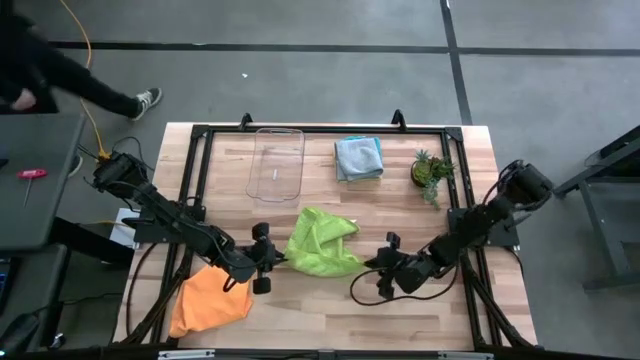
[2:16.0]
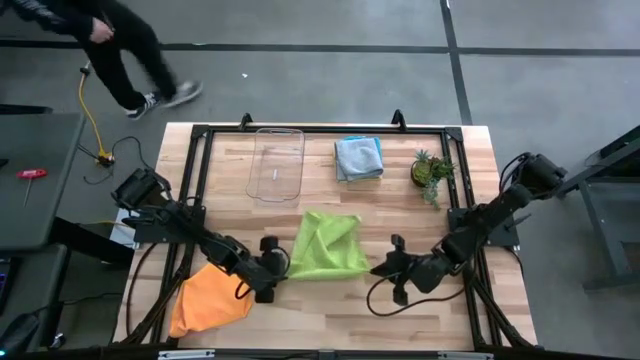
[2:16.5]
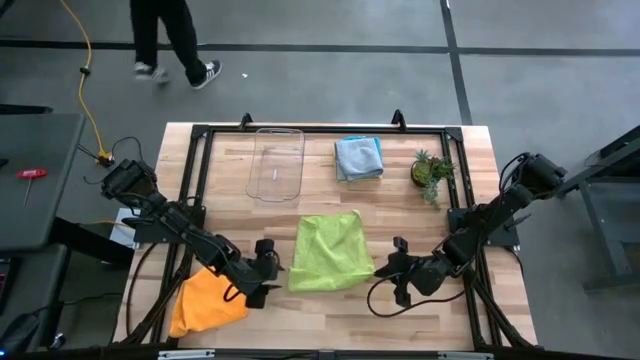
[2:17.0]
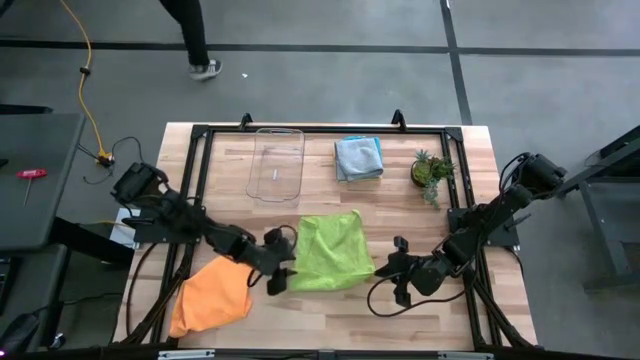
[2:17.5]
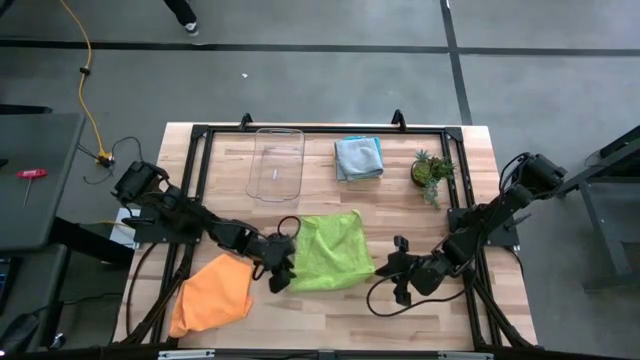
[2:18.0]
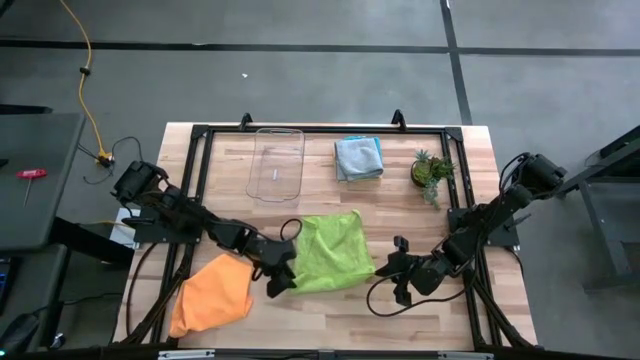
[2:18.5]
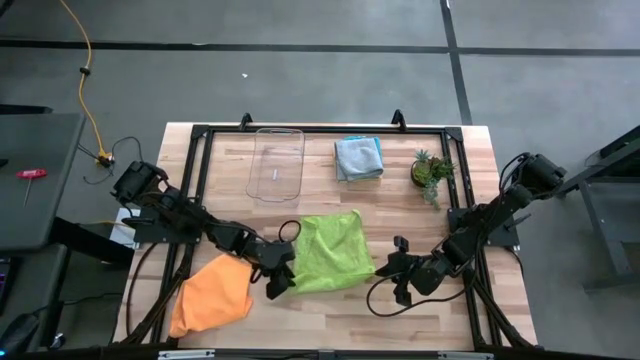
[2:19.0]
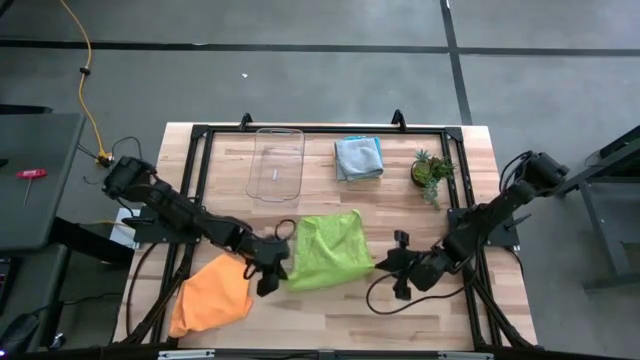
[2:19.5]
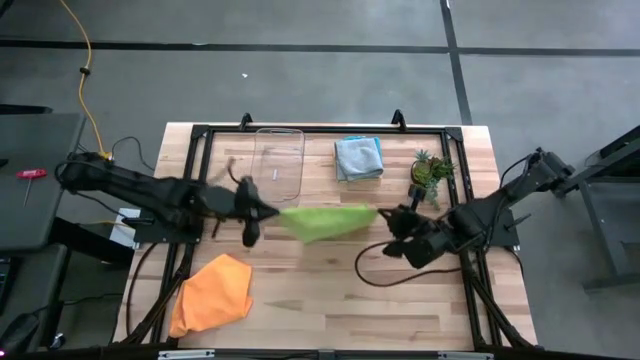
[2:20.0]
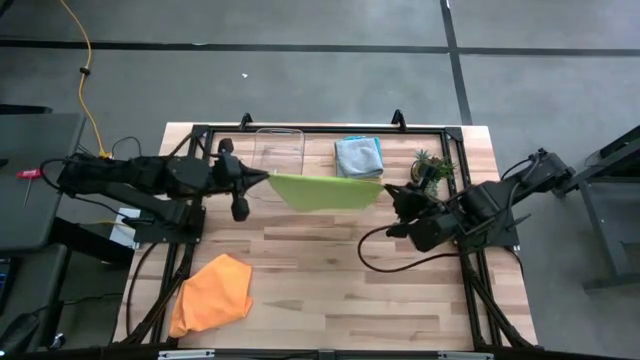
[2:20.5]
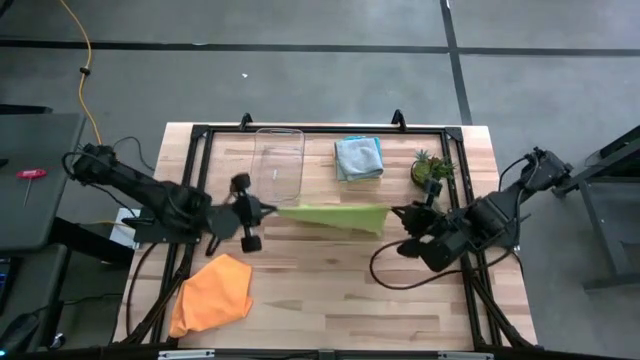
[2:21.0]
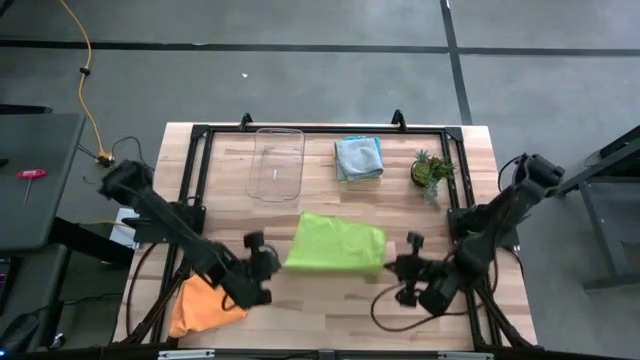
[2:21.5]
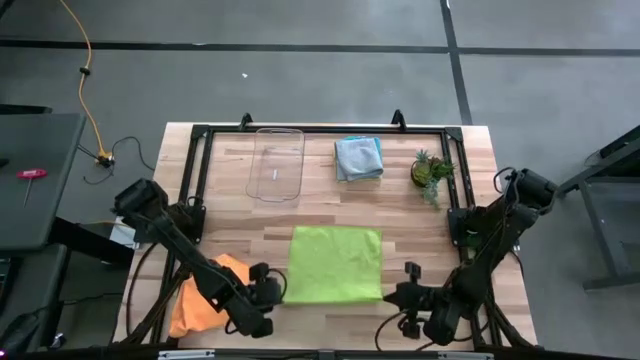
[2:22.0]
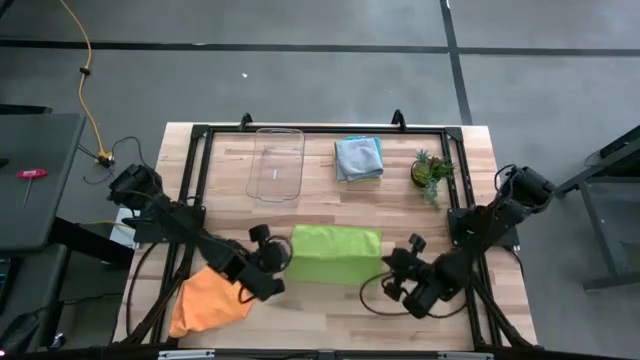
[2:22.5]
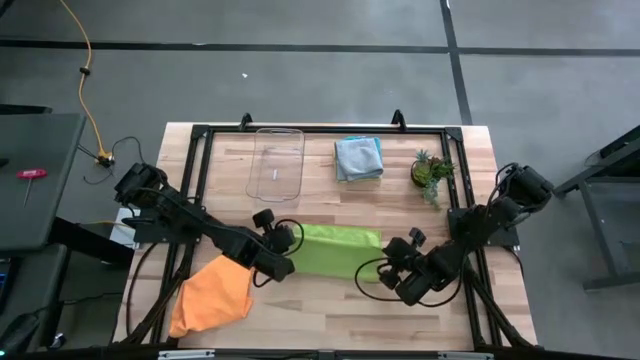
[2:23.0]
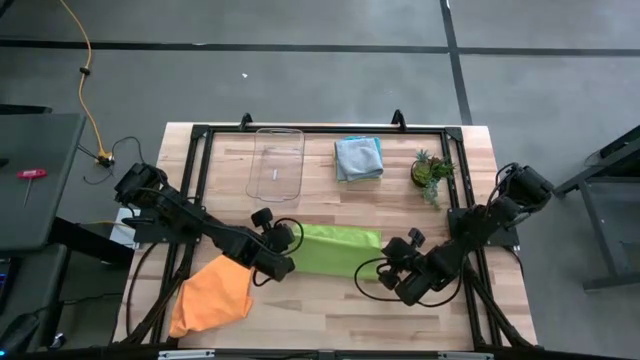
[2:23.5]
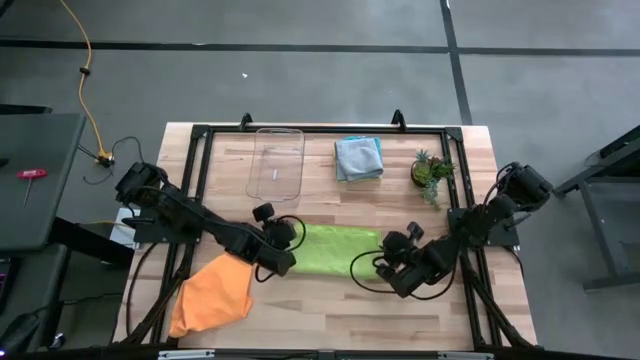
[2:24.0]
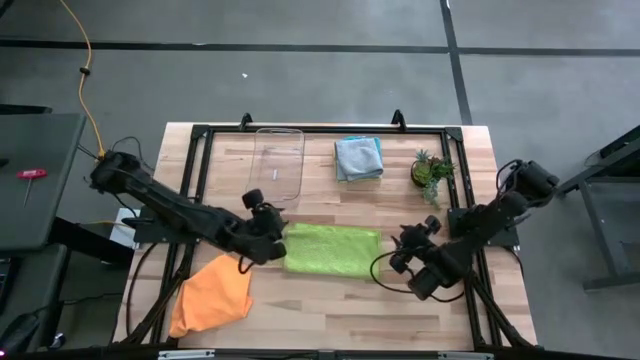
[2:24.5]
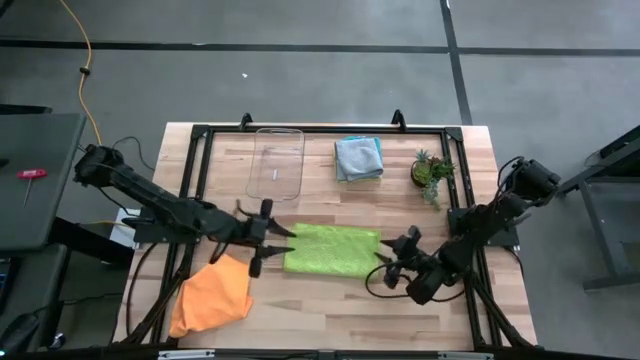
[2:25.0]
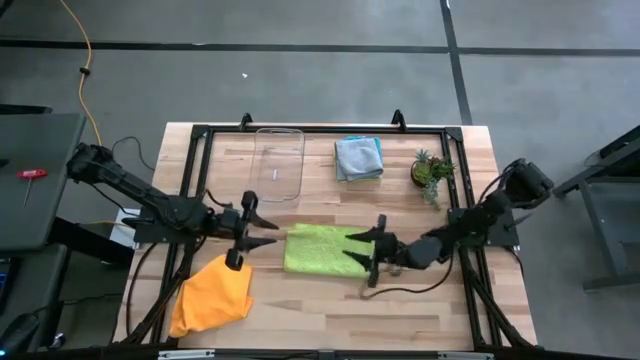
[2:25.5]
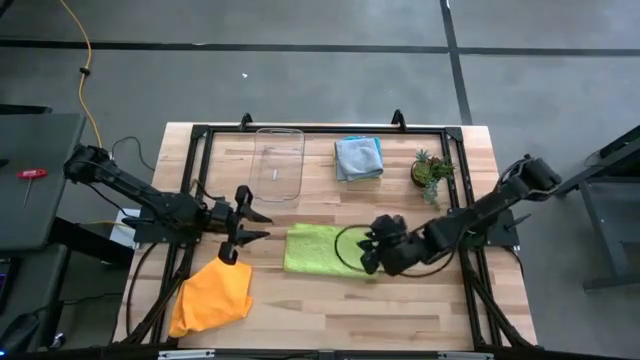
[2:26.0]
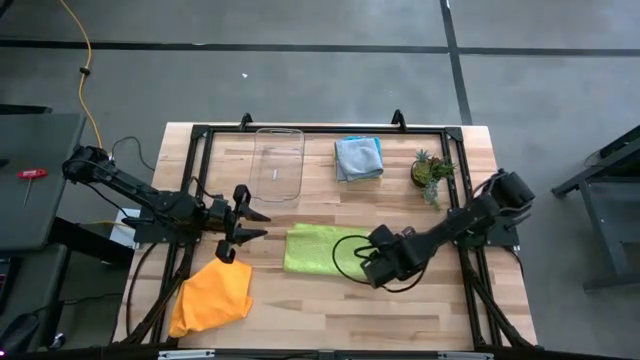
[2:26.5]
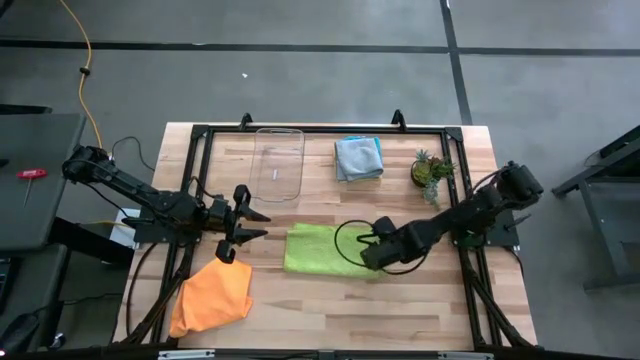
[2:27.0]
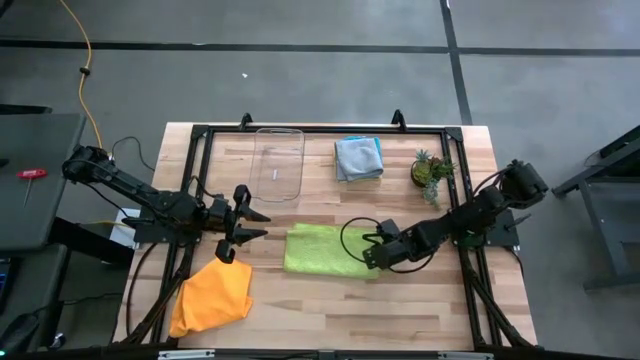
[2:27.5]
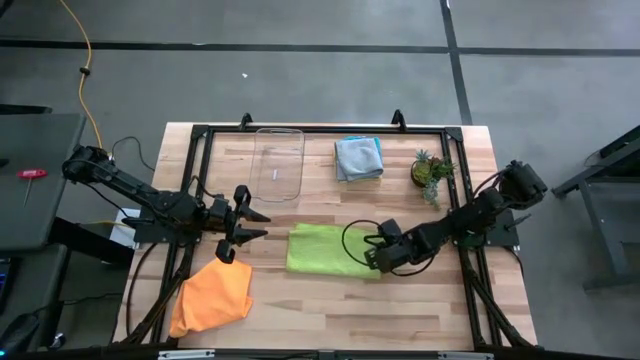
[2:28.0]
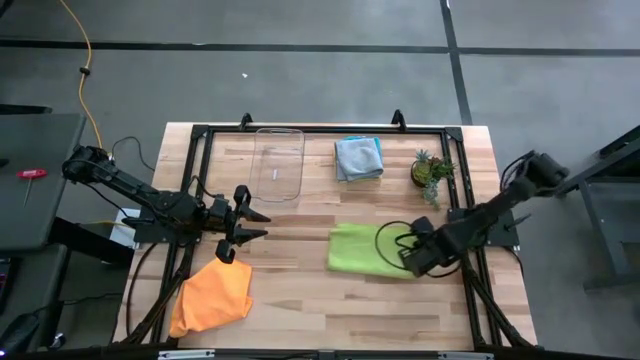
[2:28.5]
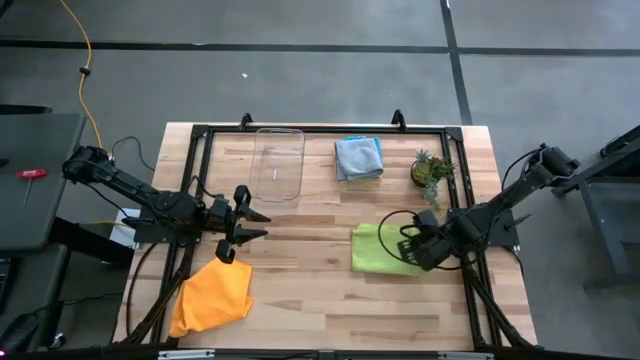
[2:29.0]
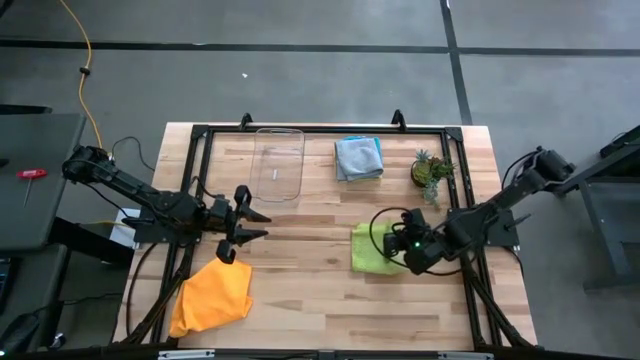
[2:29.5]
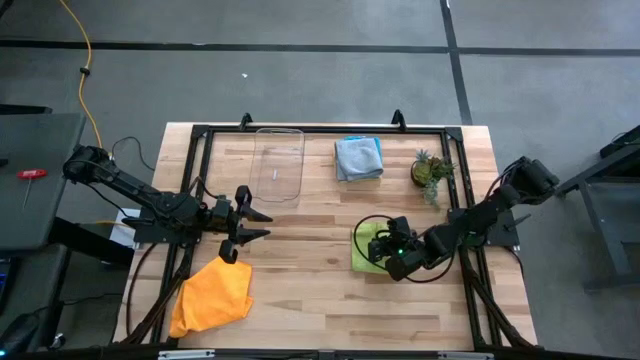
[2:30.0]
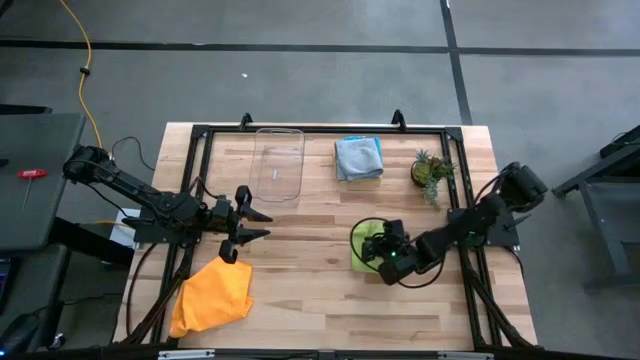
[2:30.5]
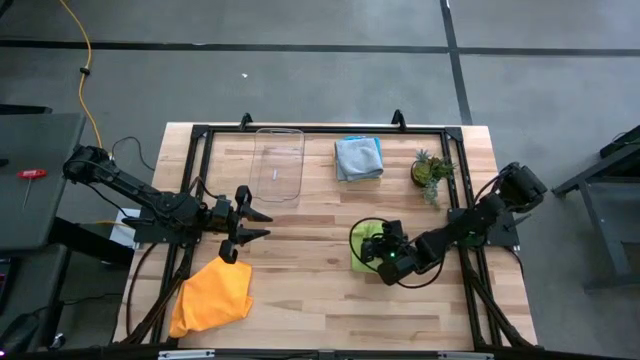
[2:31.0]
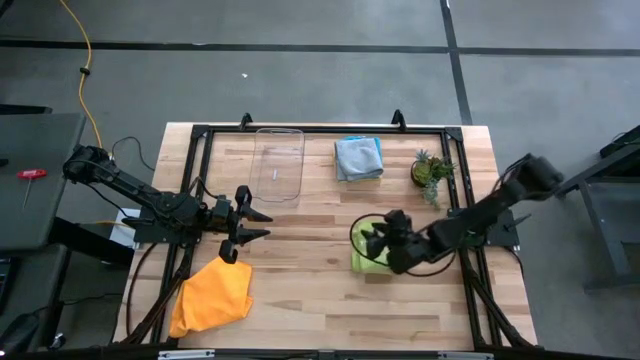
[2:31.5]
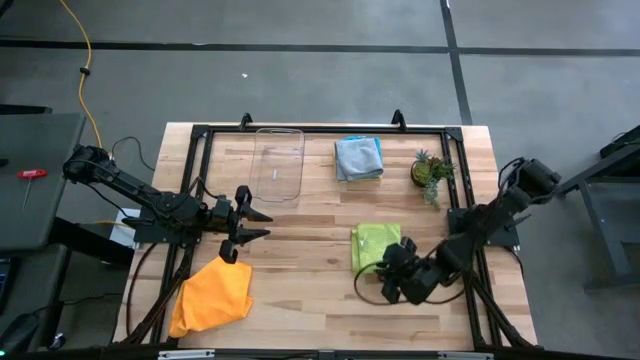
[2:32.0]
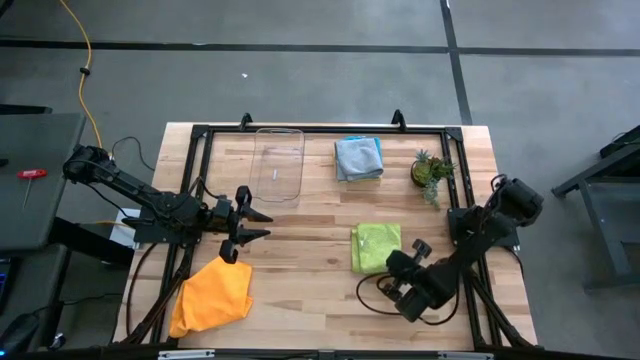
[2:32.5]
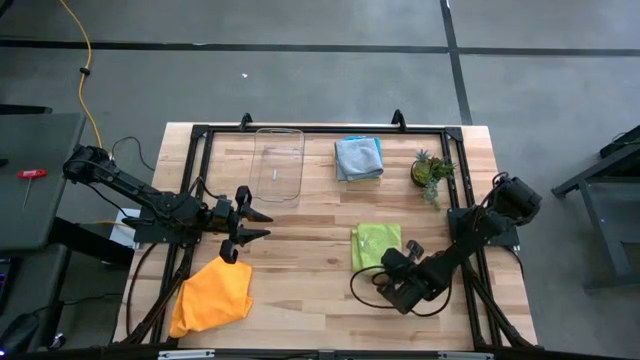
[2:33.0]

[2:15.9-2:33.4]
Task: Fold microfiber towels
Fold the green microfiber cloth

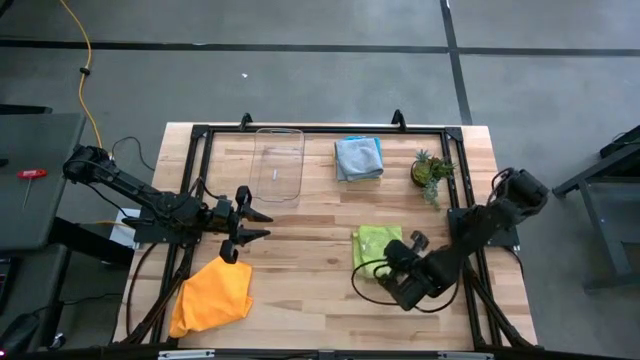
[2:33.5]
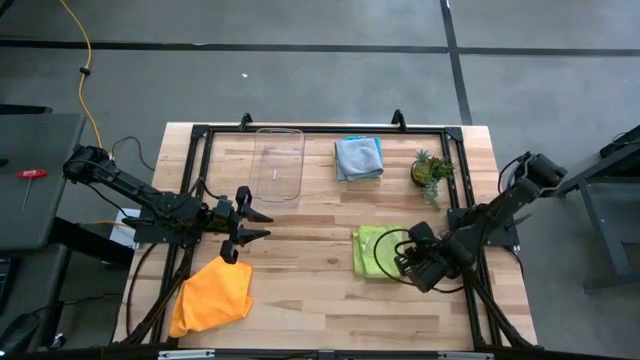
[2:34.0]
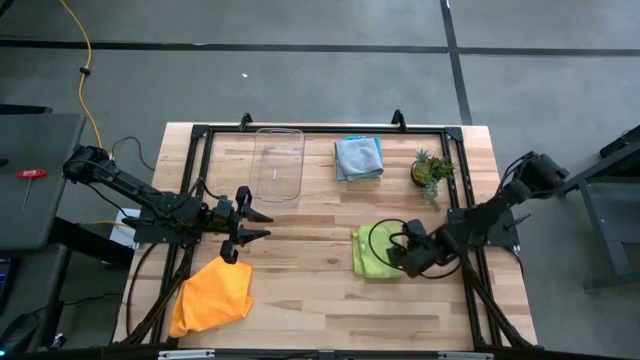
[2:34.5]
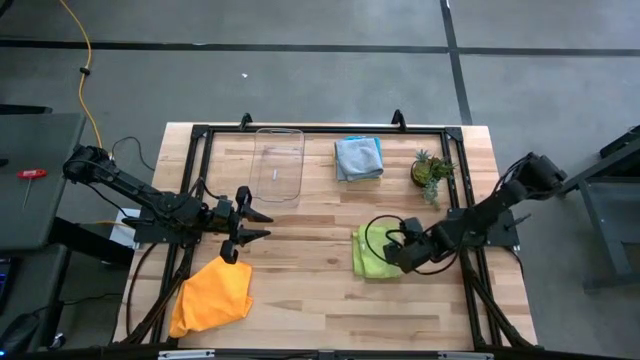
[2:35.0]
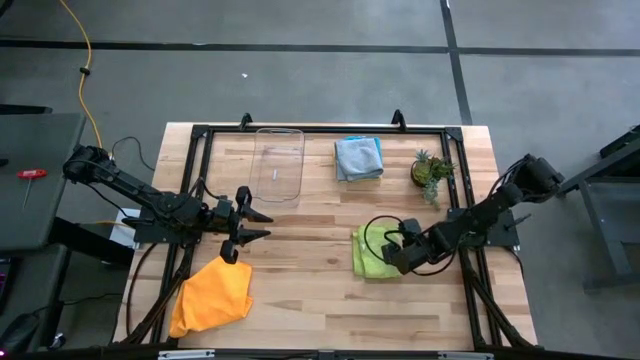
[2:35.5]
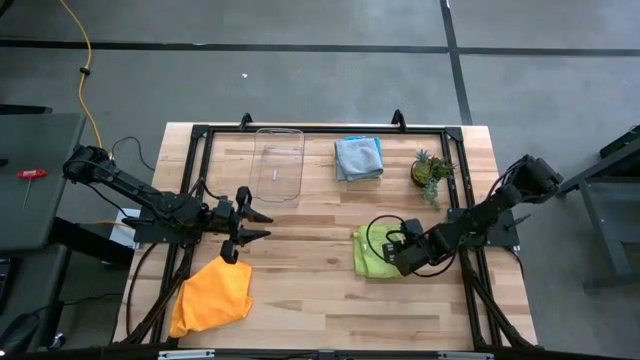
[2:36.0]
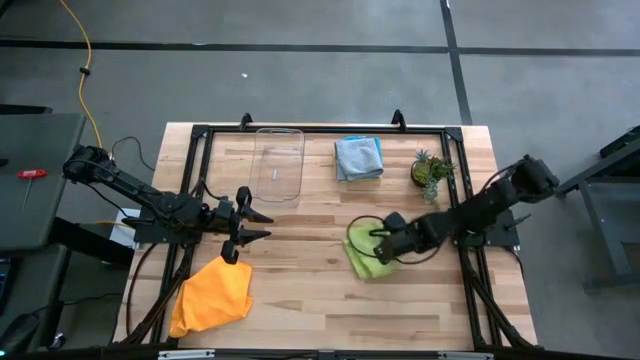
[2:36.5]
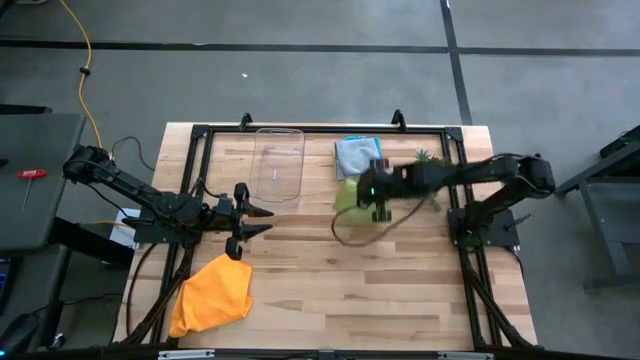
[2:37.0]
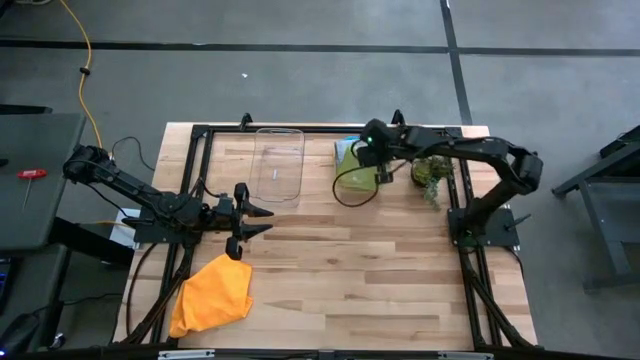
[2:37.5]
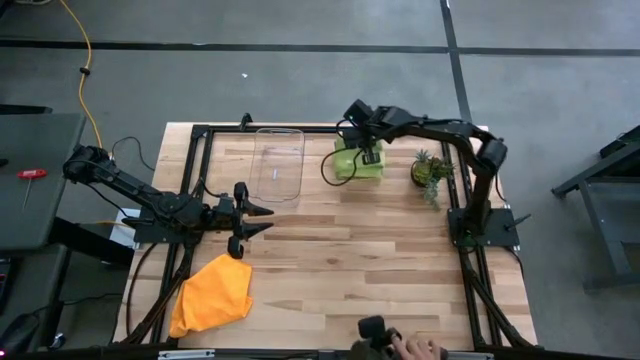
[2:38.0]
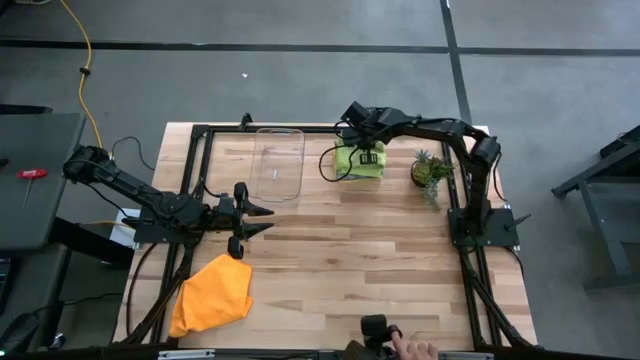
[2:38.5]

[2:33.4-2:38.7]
Stack the green microfiber cloth on the gray microfiber cloth
